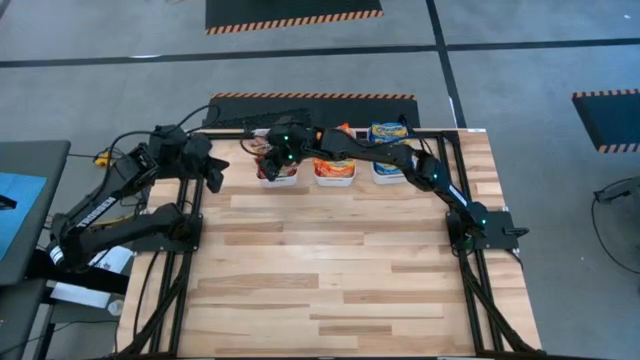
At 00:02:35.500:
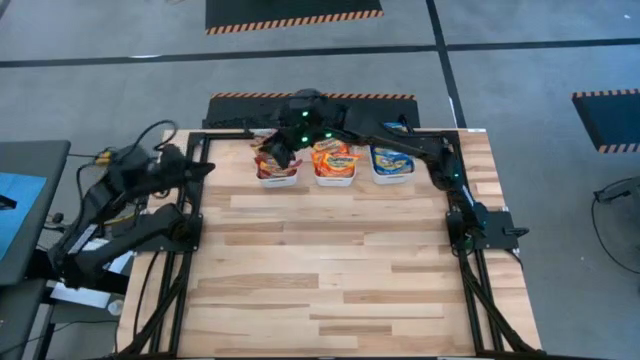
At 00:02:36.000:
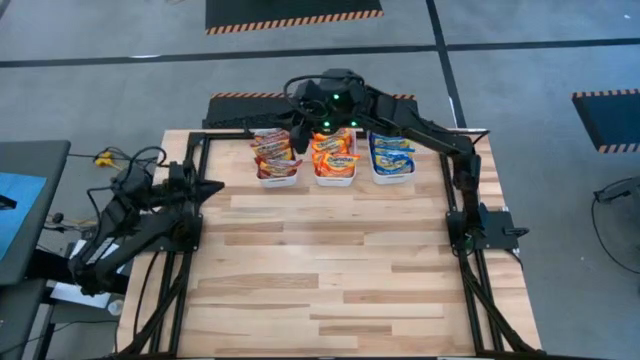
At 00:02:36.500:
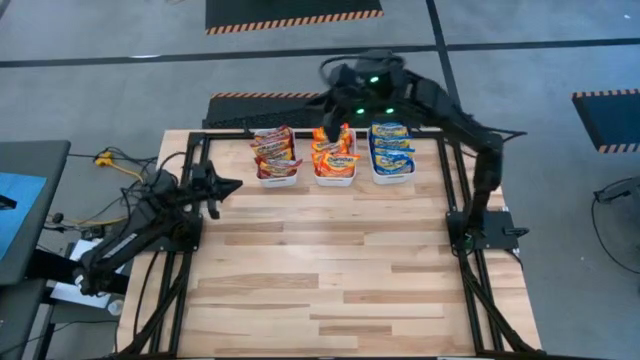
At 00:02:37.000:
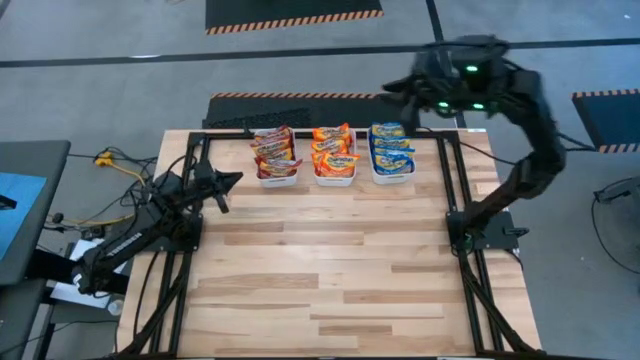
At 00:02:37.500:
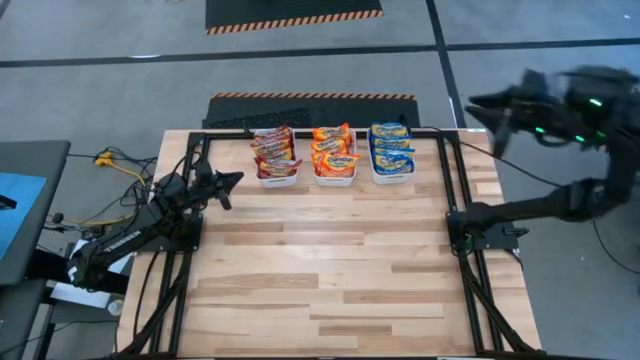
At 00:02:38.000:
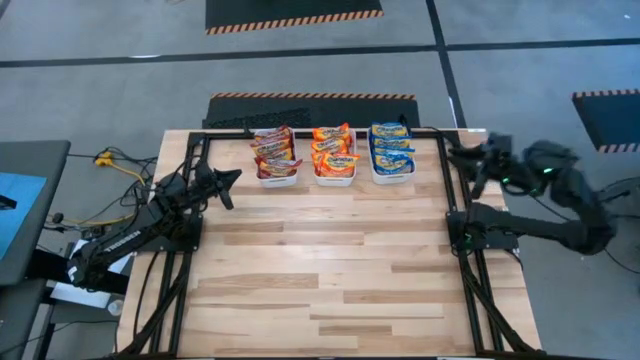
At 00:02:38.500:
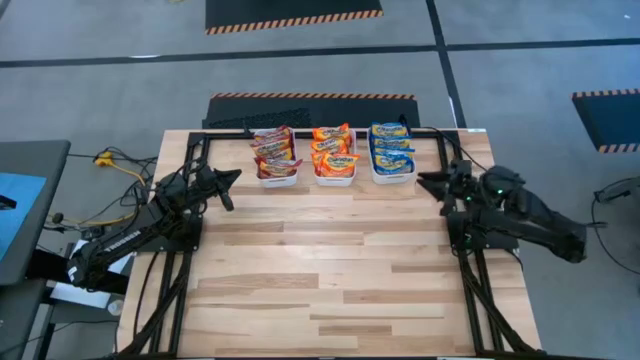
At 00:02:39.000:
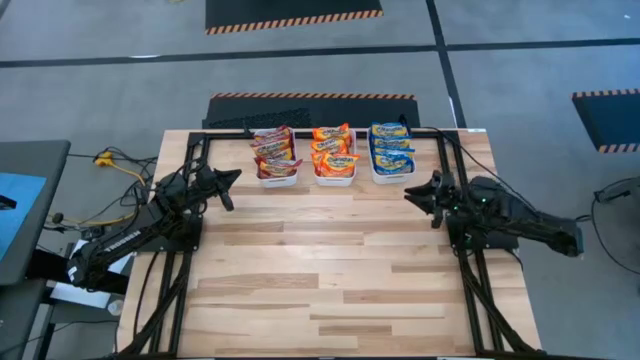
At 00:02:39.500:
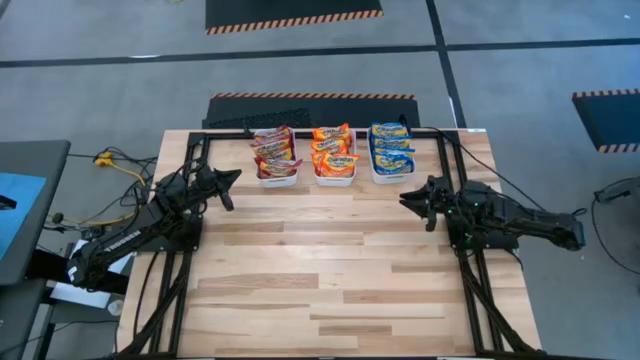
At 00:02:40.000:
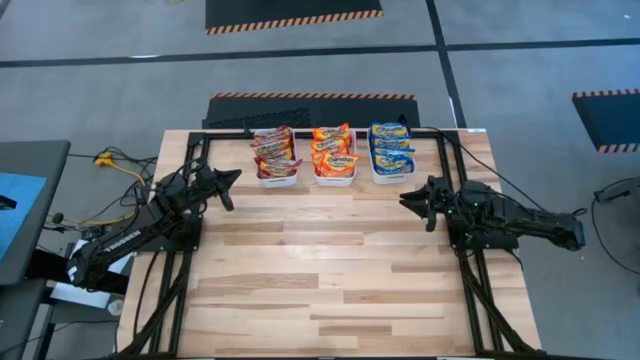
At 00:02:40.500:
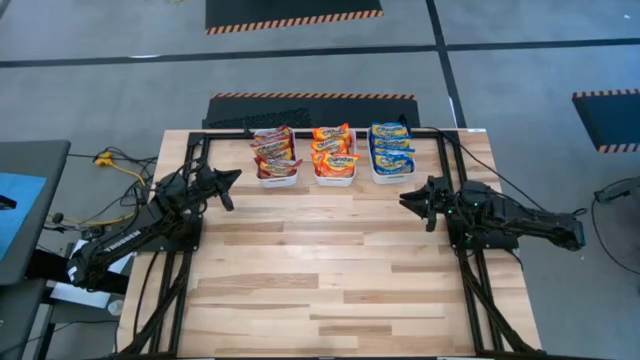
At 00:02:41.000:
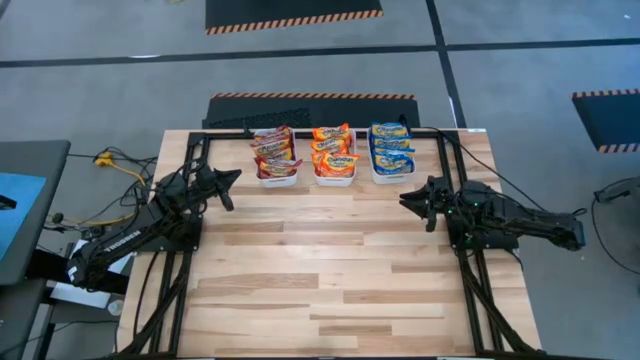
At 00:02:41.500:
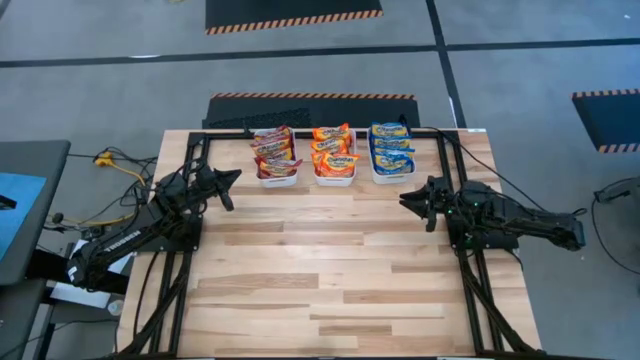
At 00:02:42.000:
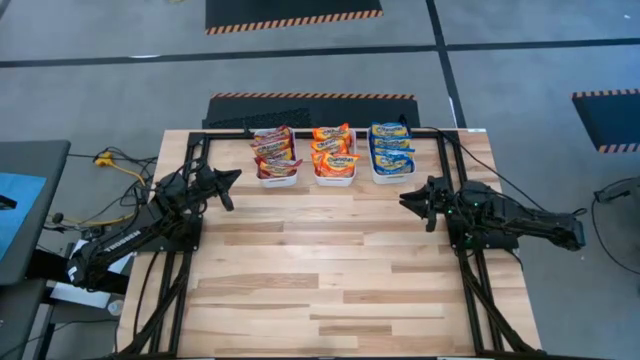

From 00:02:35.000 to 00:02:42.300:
Task: Sort Maruchan noodles
Return to Home Position

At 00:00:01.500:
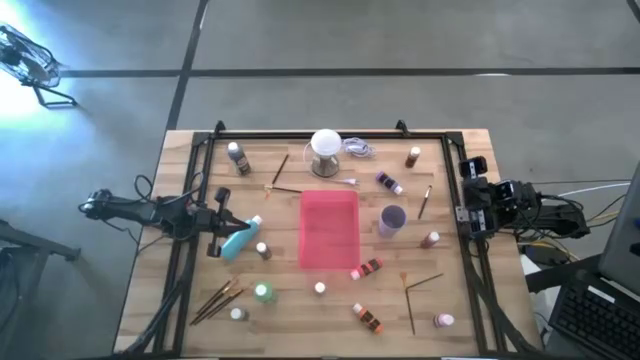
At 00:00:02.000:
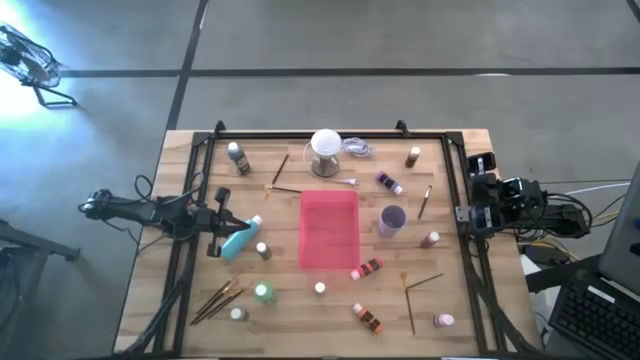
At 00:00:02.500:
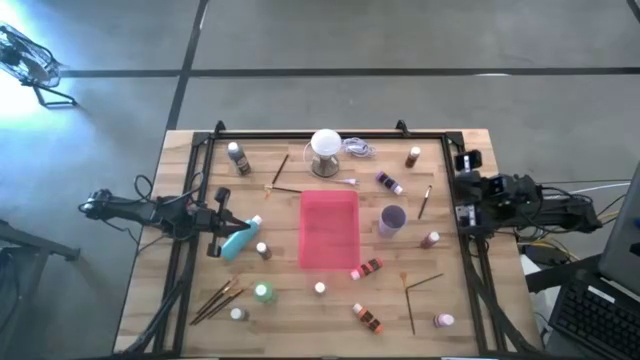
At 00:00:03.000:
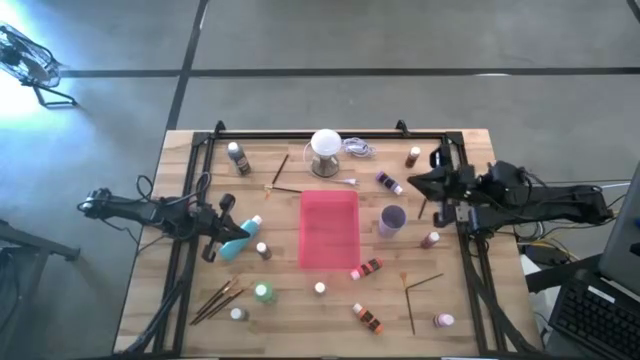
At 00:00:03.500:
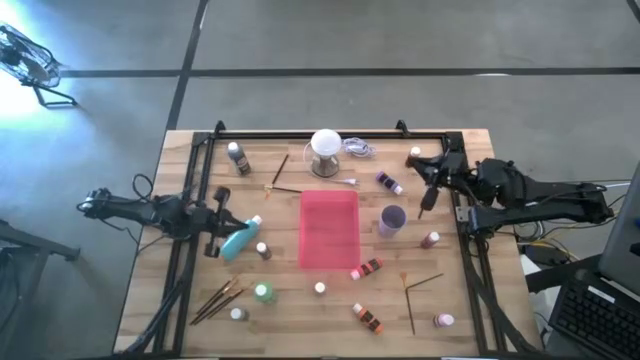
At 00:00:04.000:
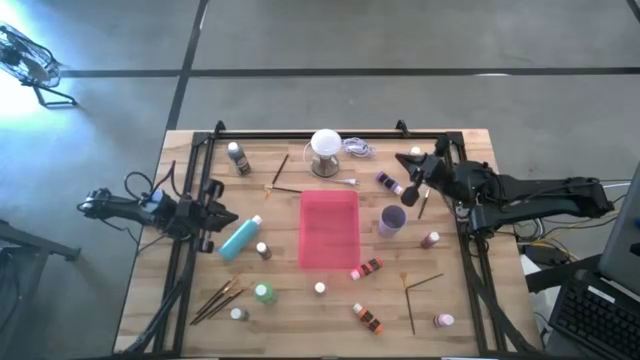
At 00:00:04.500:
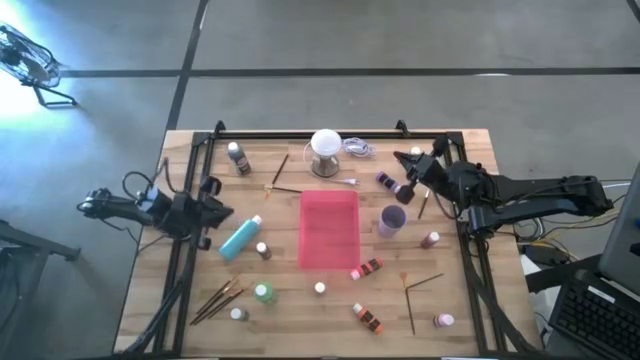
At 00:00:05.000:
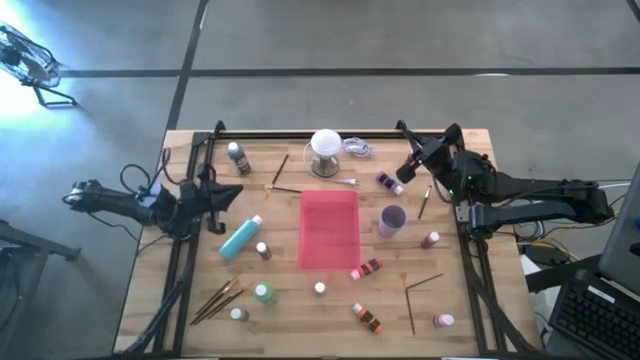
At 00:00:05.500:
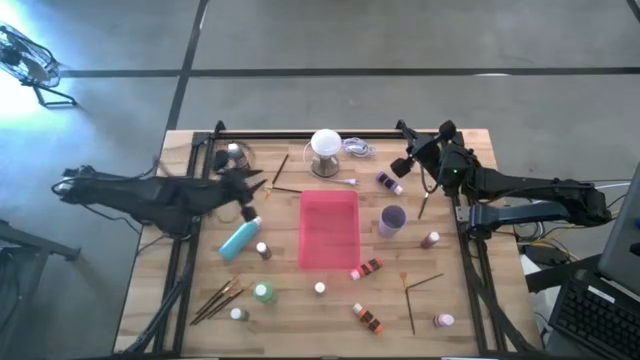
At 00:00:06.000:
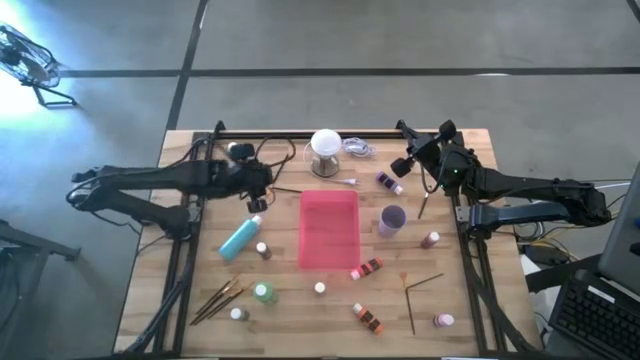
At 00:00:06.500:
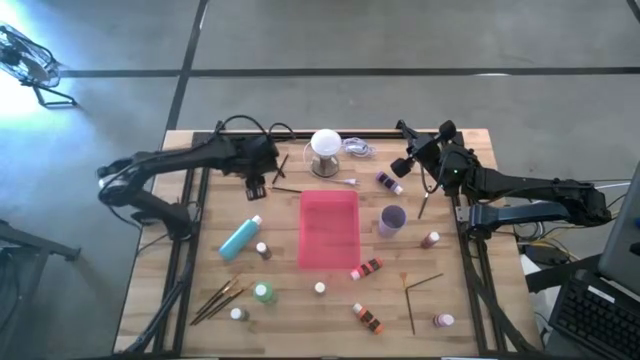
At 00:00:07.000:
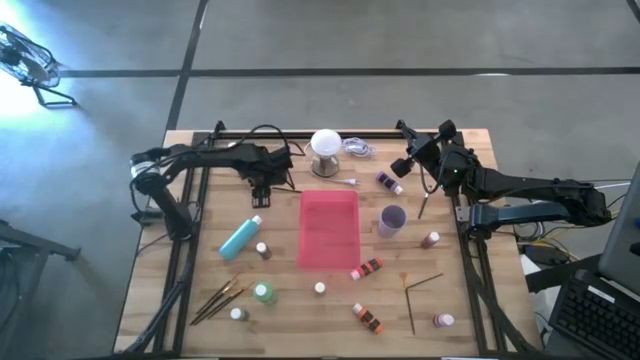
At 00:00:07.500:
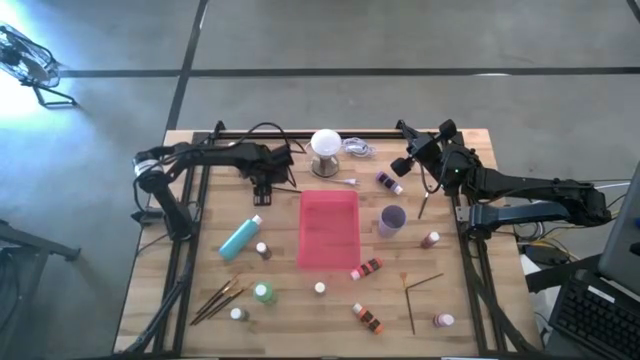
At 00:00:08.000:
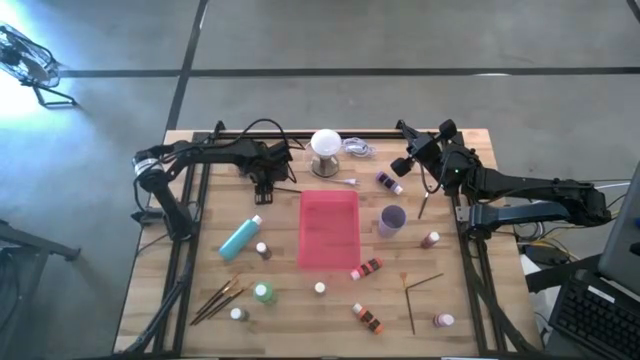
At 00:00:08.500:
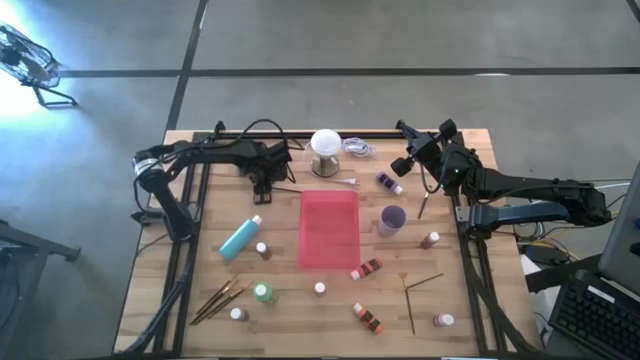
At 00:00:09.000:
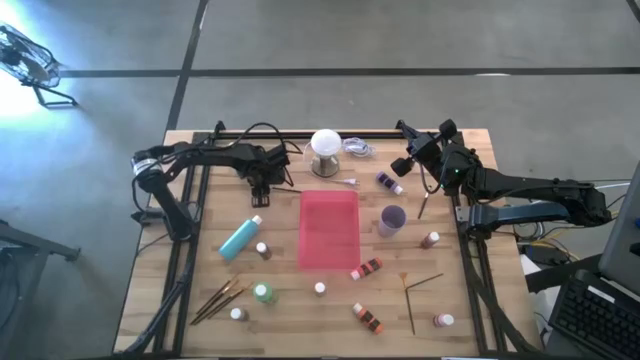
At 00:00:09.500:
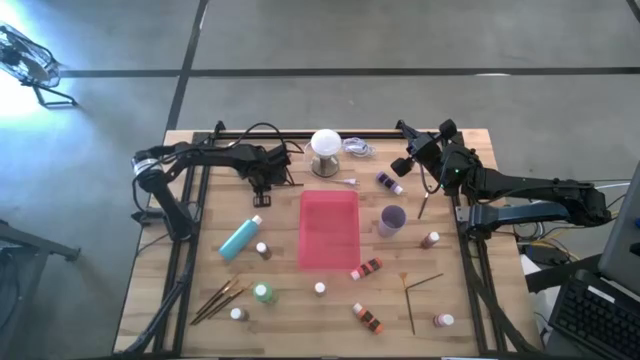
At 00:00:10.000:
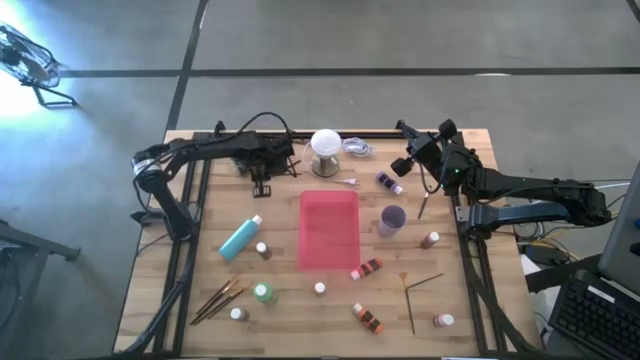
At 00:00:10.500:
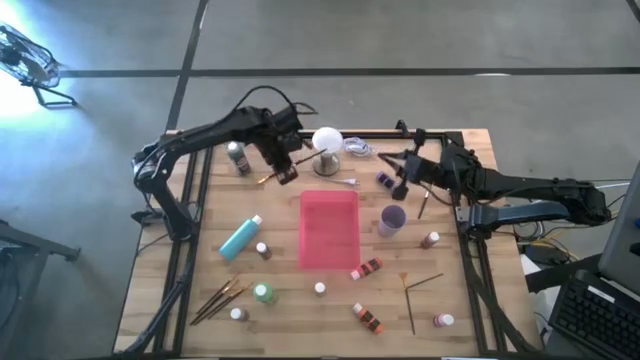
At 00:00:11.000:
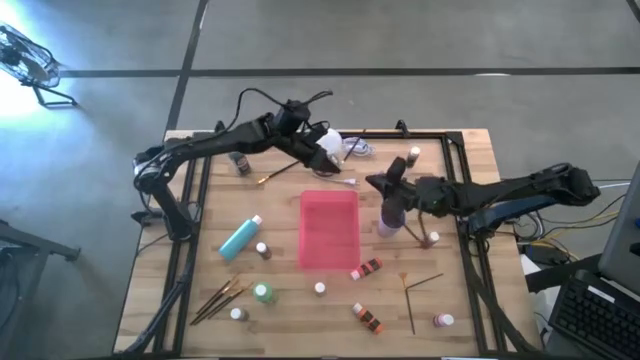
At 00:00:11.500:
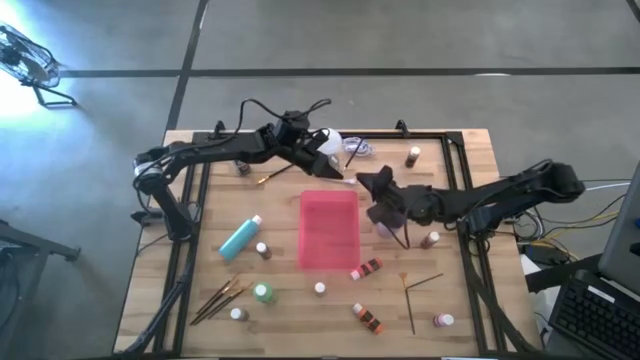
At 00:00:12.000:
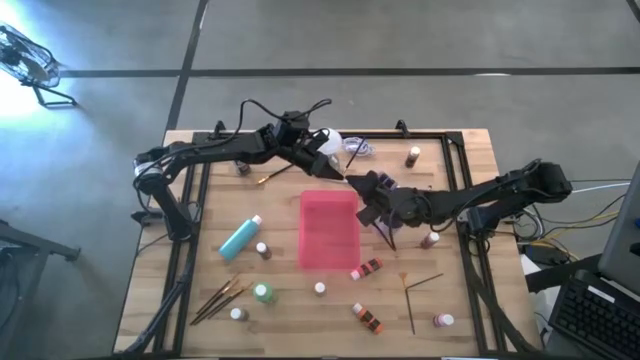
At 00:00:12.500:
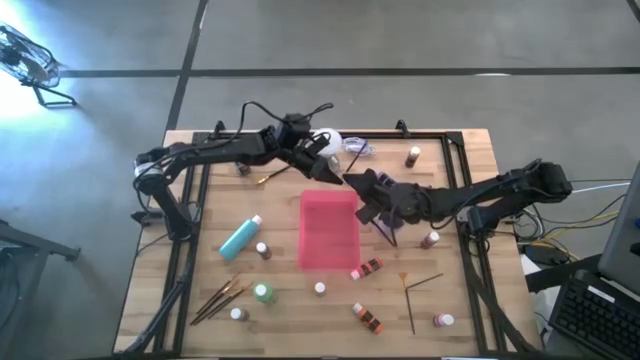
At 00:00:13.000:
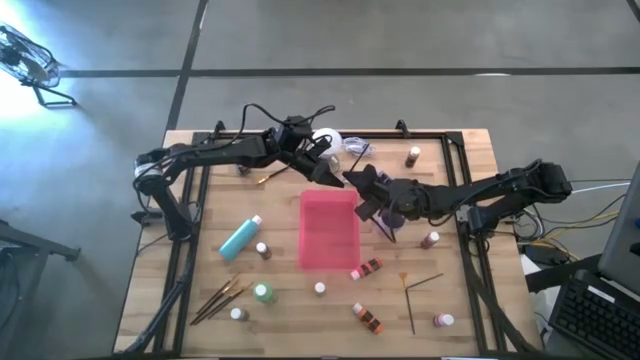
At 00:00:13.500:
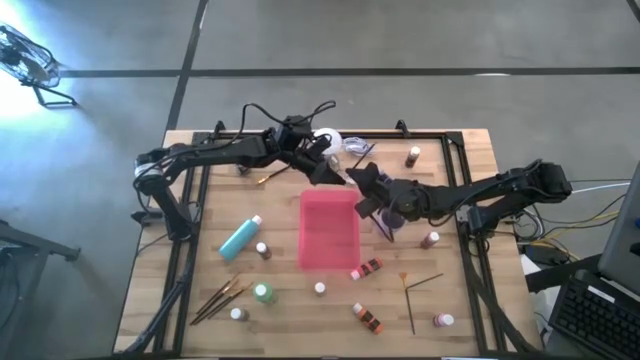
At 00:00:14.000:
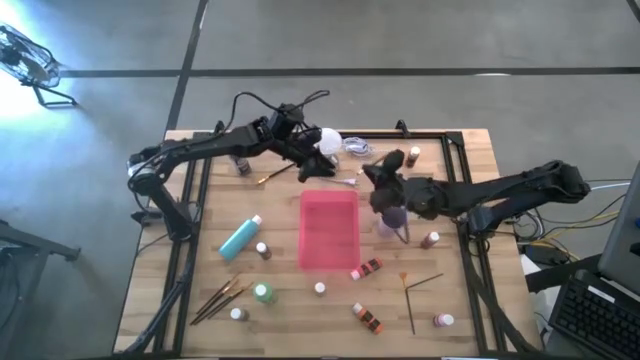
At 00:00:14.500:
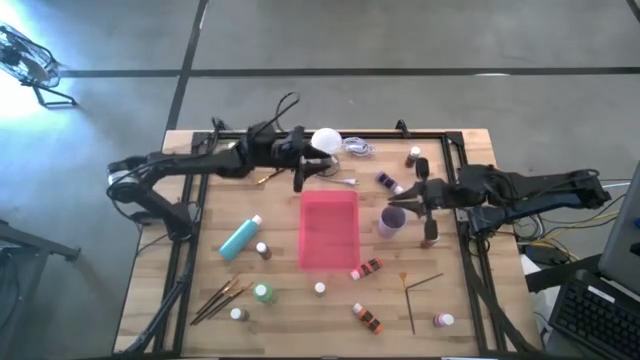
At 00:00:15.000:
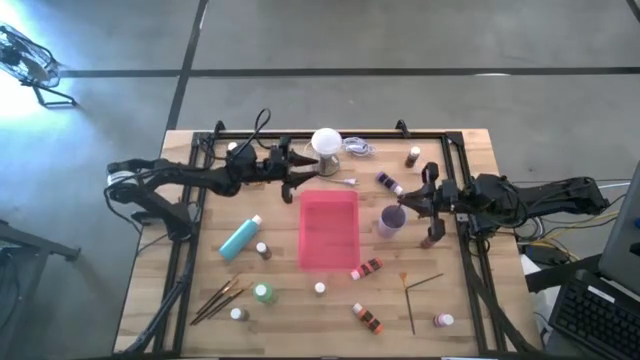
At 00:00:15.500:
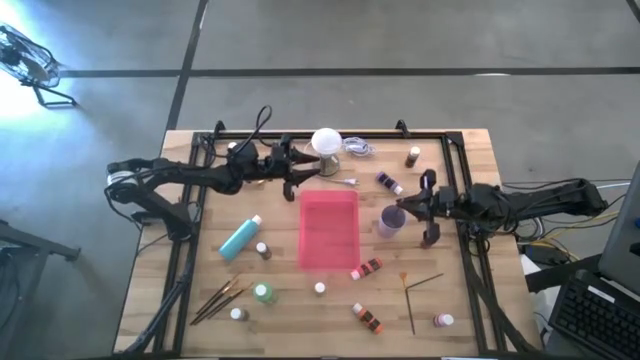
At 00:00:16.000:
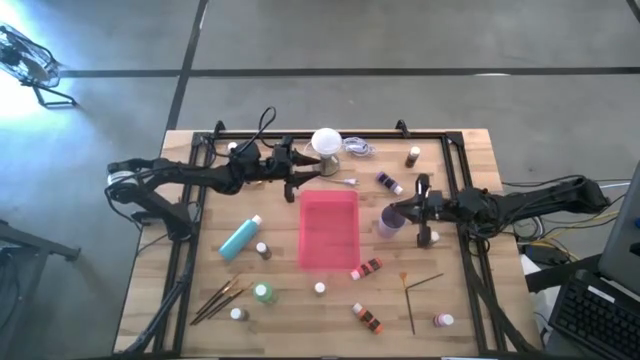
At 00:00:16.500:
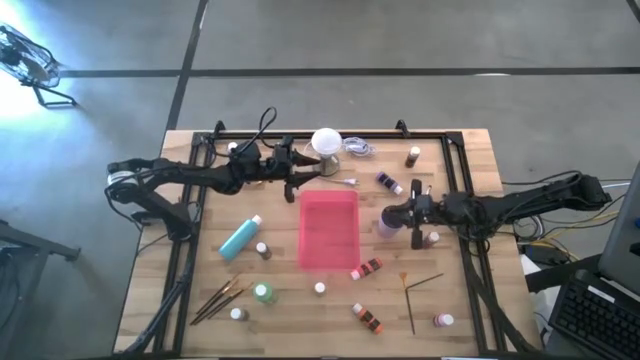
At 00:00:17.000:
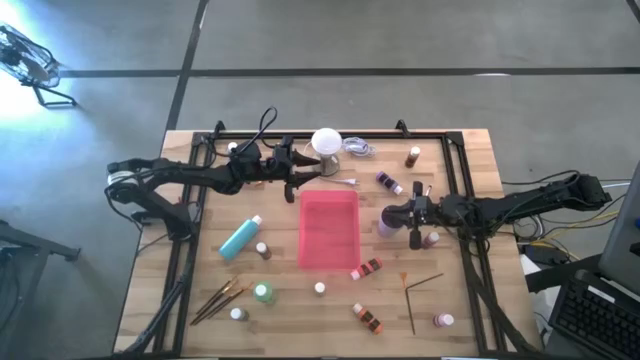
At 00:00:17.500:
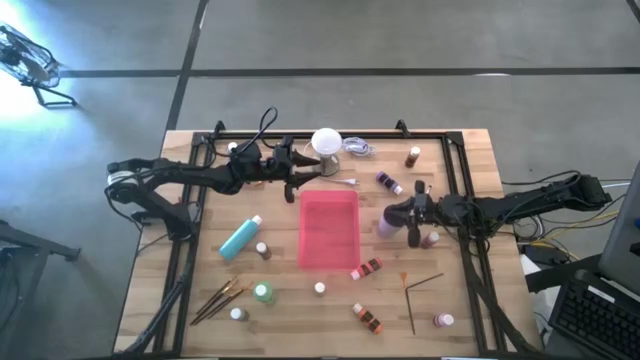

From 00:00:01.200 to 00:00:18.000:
Task: Pick & Place Paint Supplies
Put the silver paintbrush into the purple cup
